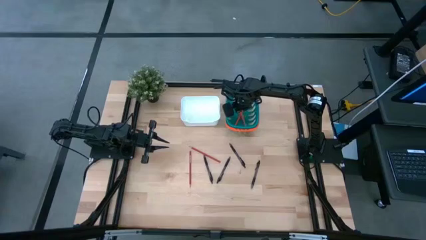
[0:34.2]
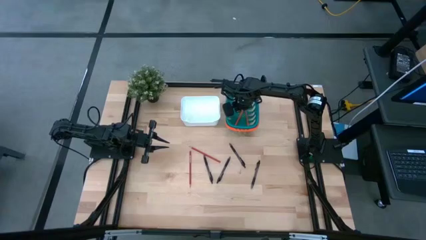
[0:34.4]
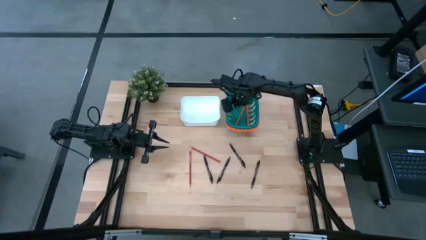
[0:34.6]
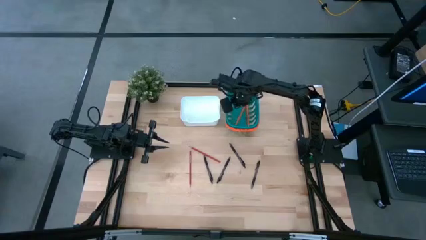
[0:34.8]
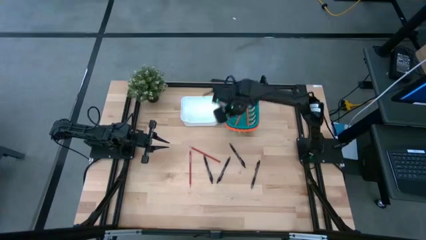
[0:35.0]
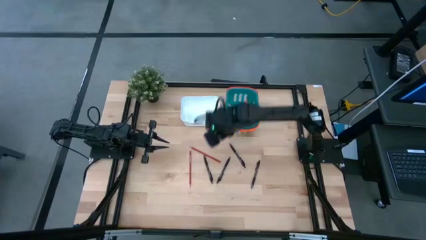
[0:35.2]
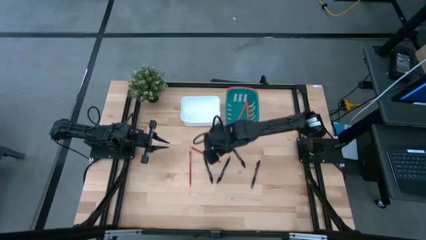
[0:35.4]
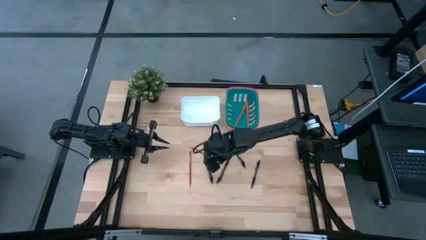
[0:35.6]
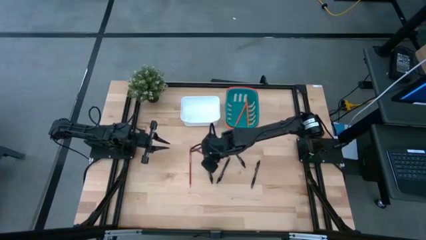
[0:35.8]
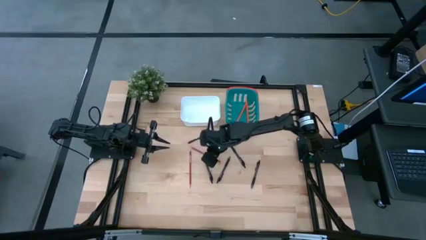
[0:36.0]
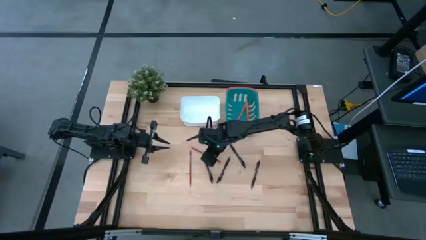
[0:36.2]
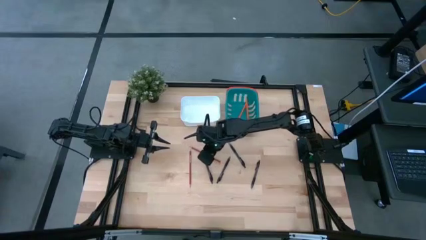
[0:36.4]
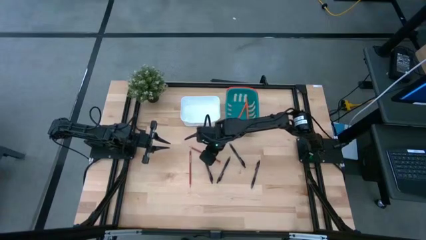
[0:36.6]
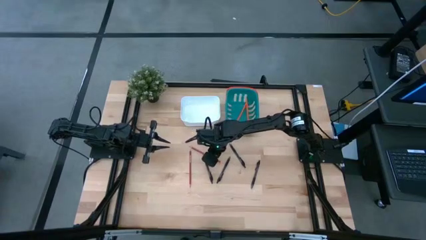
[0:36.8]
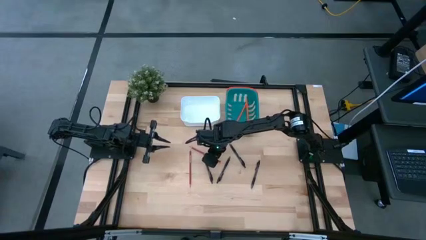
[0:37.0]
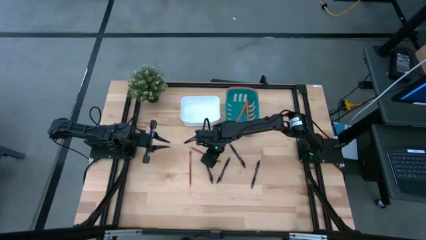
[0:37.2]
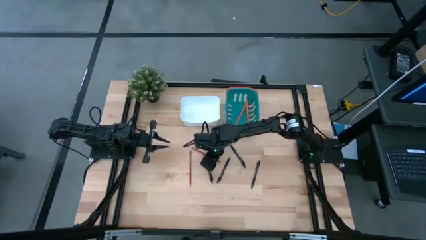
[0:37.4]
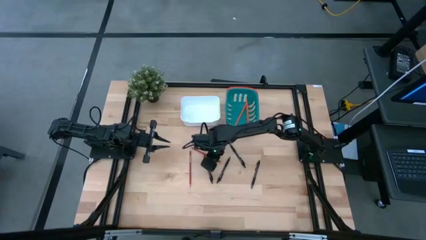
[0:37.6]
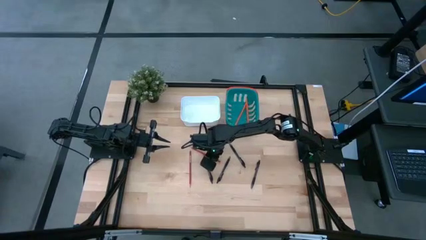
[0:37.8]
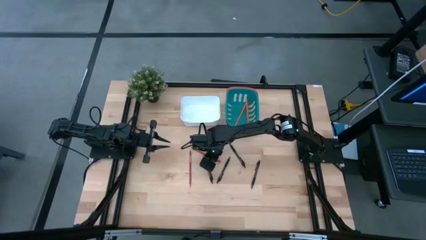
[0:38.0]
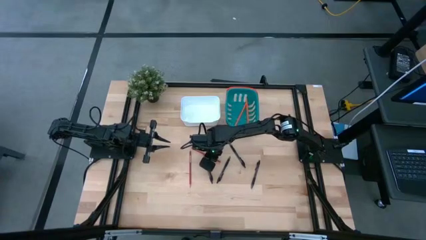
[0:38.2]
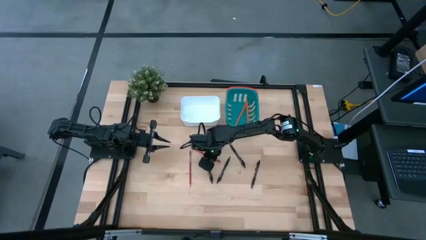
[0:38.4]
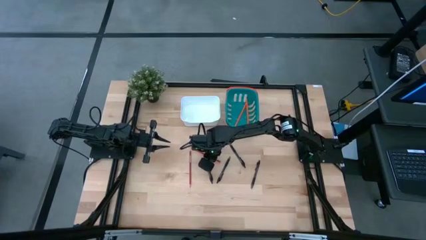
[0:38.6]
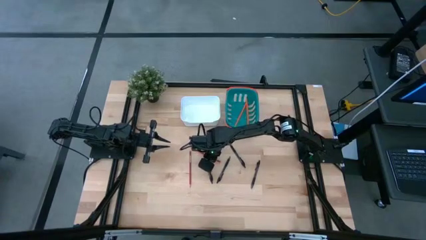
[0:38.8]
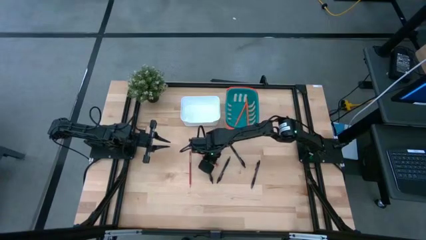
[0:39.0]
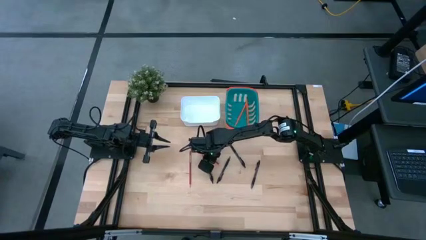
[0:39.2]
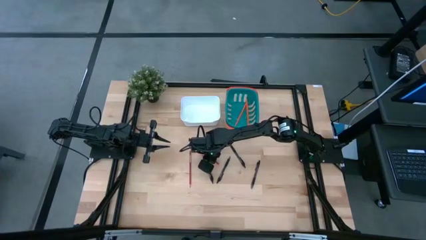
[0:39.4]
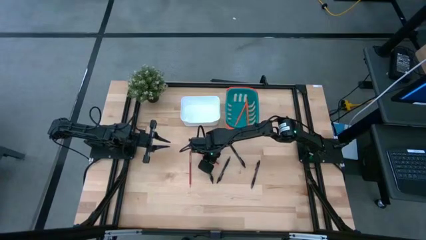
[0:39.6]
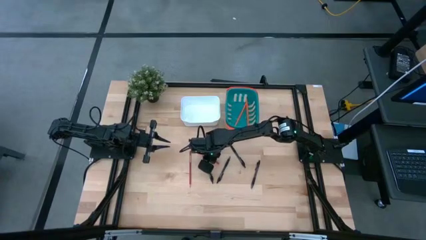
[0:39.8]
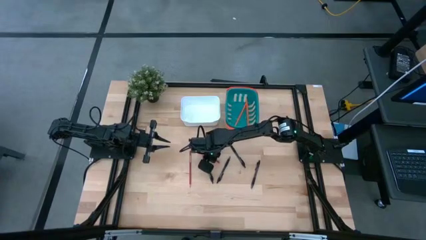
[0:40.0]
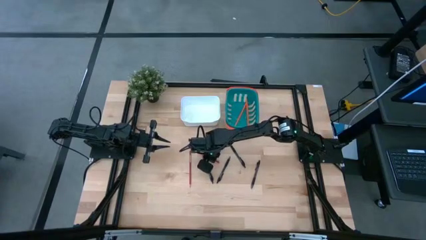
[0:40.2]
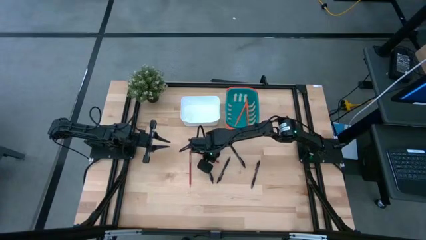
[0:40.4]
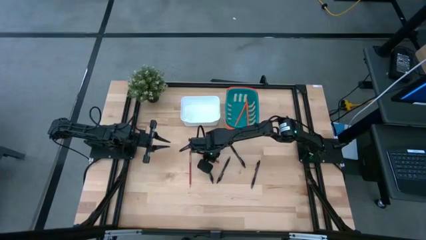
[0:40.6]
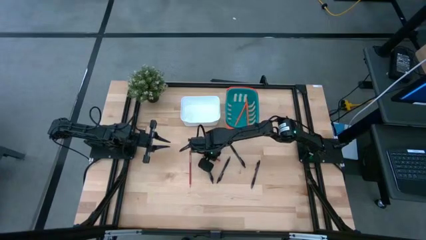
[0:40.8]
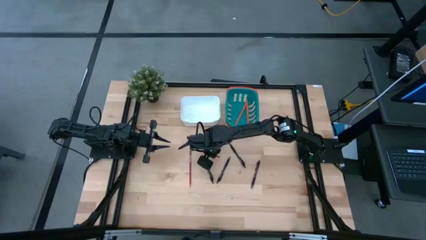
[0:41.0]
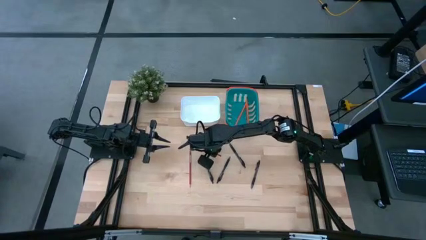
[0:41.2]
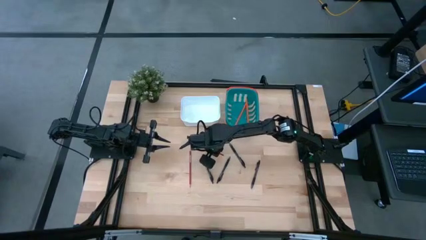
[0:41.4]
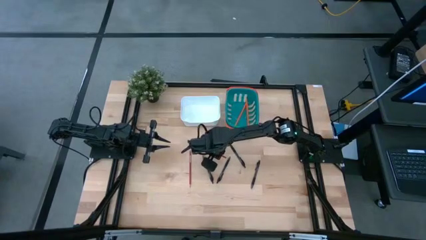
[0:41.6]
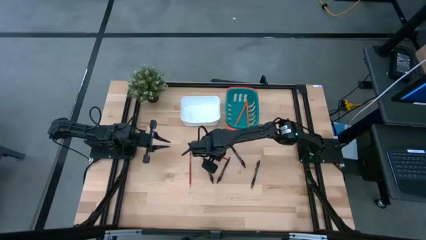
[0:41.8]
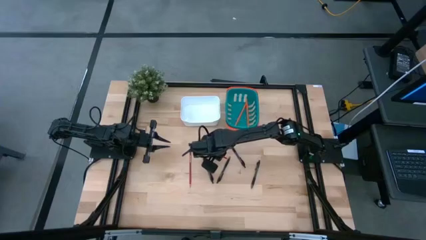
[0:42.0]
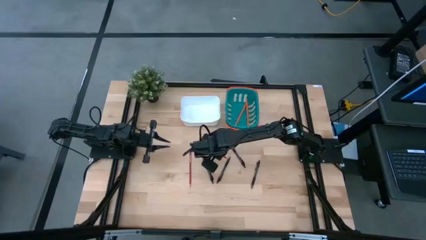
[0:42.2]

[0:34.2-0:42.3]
Task: Sort pens & pencils
Put the right red pencil into the blue bin

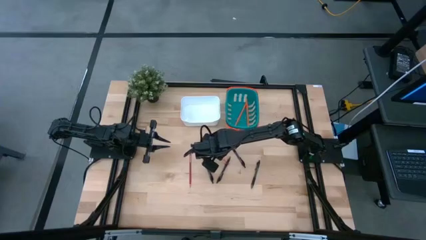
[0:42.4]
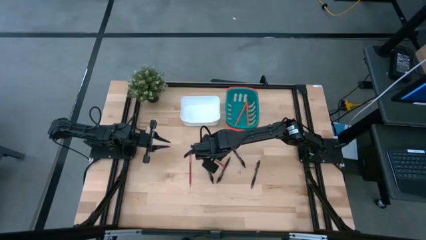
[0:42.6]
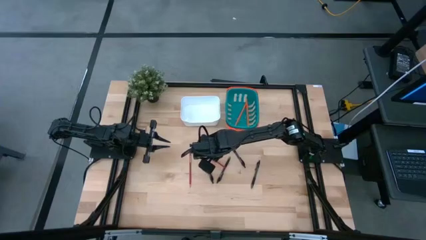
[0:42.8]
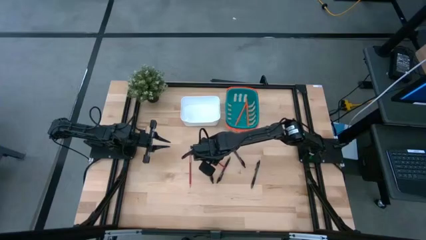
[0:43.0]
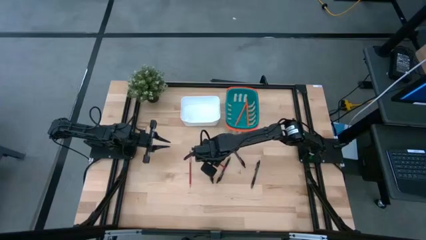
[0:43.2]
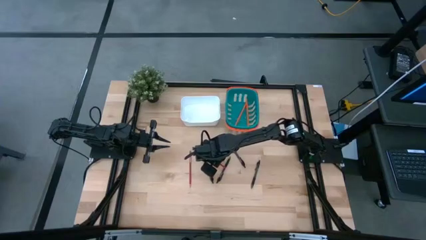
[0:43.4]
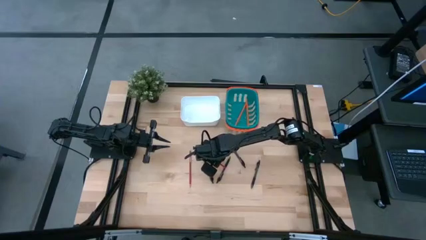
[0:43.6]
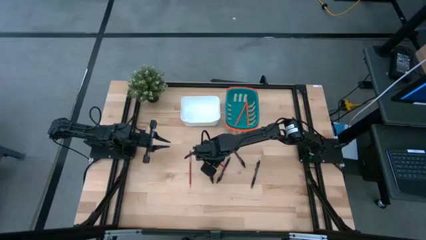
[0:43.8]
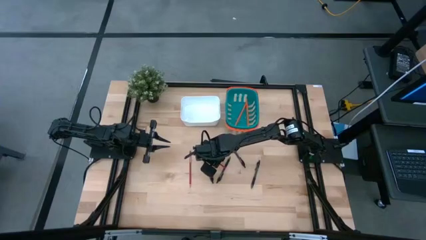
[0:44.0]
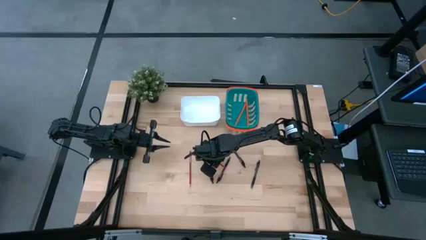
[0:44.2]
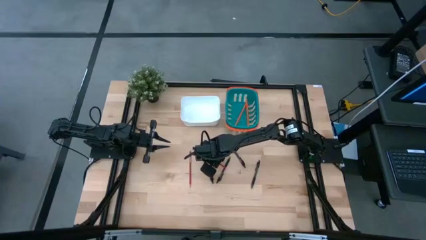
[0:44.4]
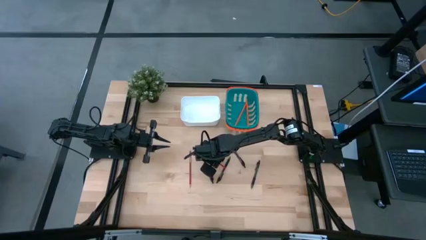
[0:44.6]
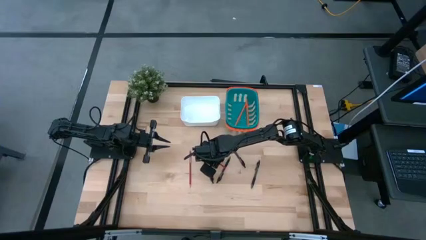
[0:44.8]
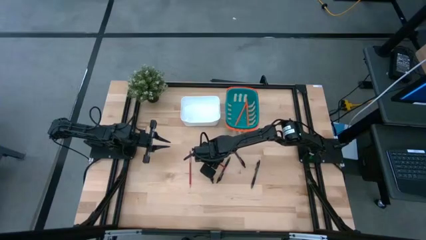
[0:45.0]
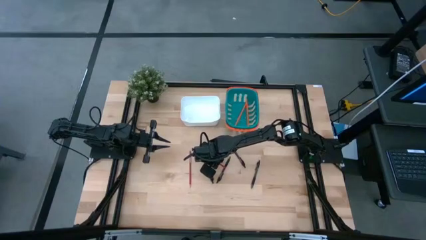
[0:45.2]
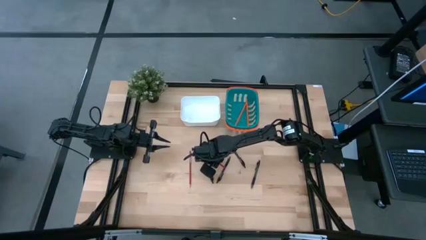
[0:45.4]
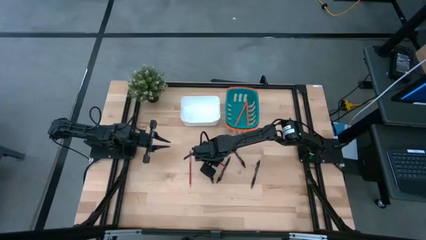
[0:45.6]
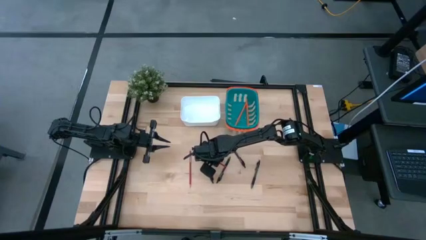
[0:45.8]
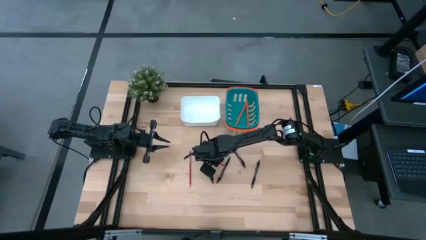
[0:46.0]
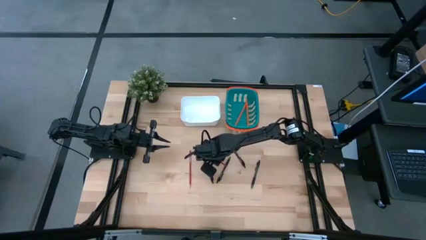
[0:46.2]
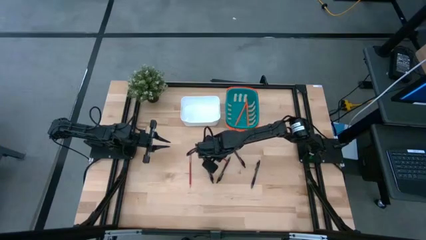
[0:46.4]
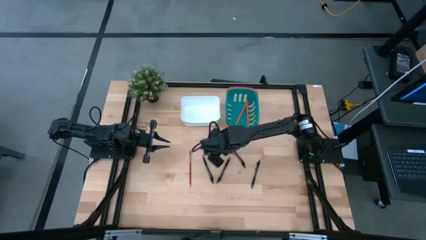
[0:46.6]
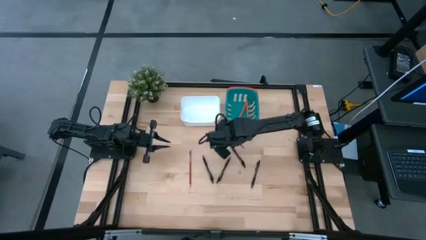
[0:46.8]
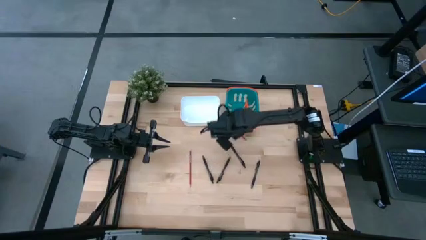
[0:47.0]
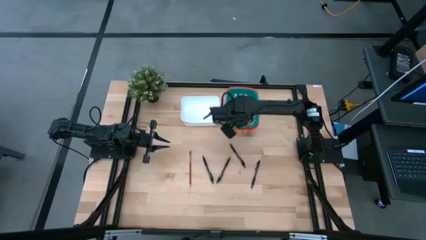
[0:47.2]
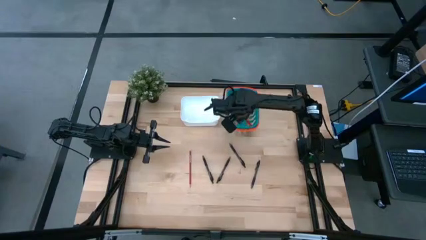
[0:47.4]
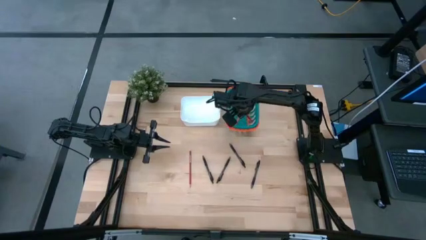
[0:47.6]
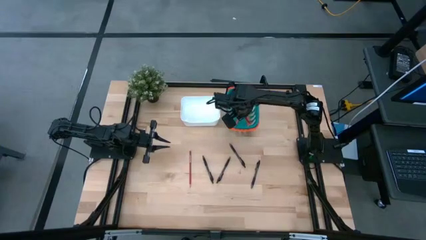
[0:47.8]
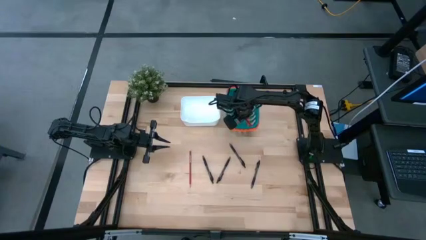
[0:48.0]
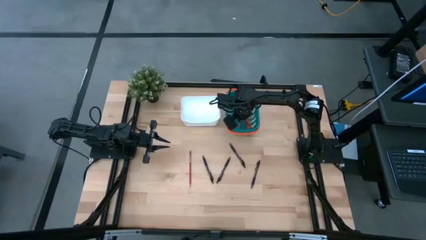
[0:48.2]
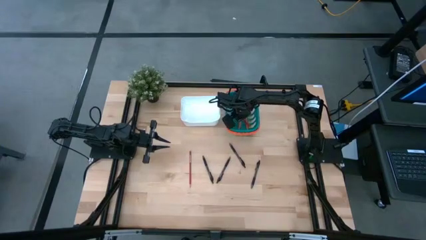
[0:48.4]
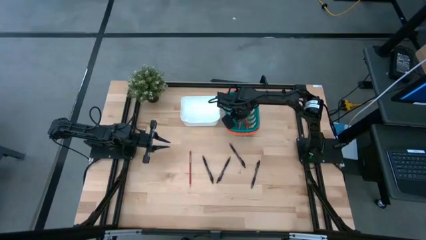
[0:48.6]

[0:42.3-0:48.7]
Put the right red pencil into the blue bin

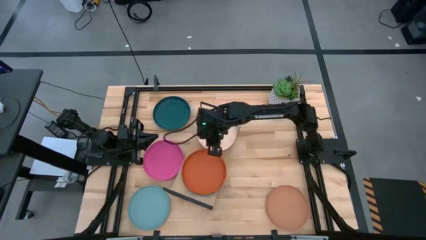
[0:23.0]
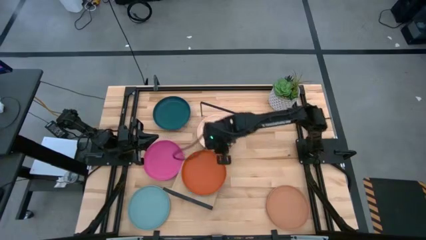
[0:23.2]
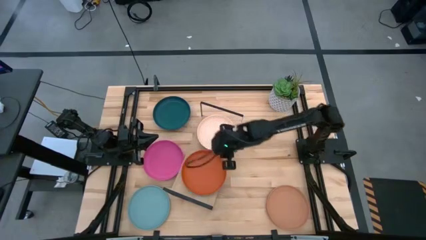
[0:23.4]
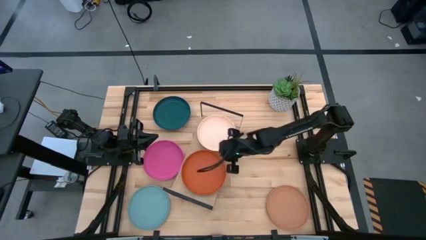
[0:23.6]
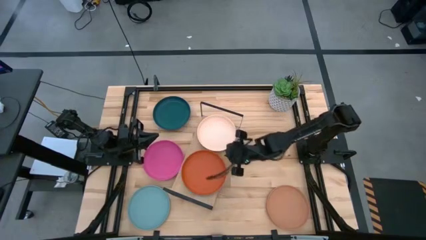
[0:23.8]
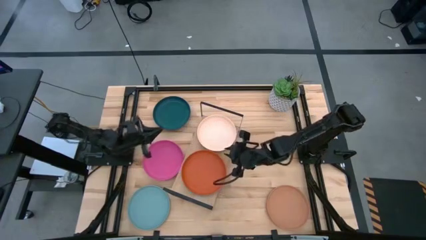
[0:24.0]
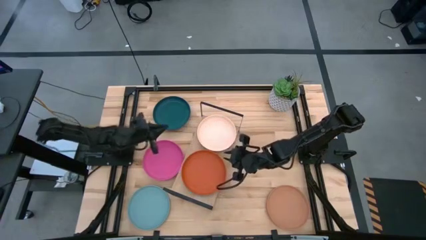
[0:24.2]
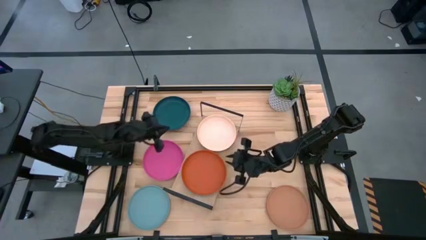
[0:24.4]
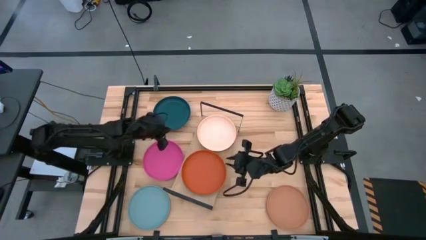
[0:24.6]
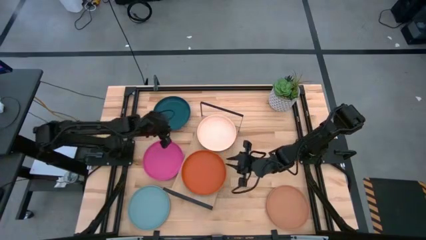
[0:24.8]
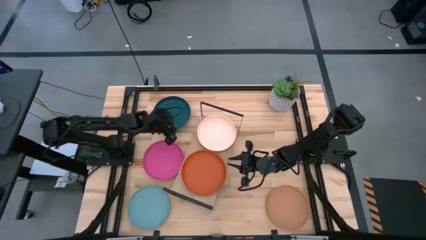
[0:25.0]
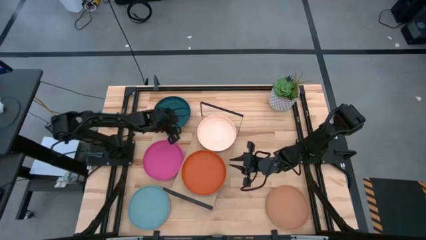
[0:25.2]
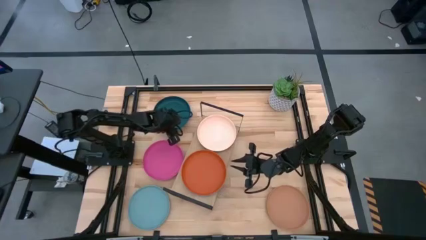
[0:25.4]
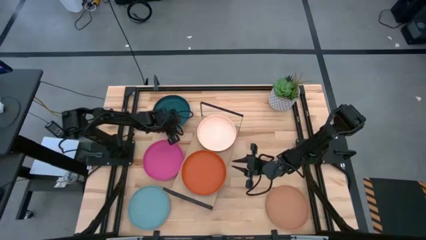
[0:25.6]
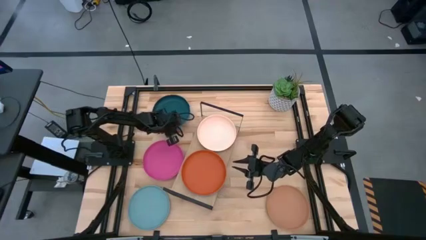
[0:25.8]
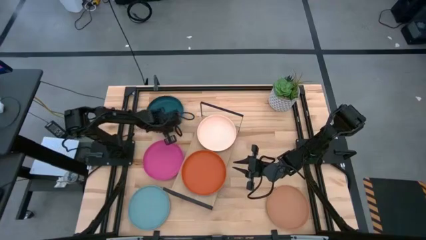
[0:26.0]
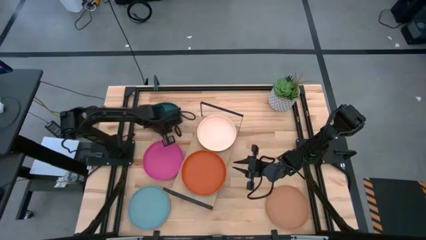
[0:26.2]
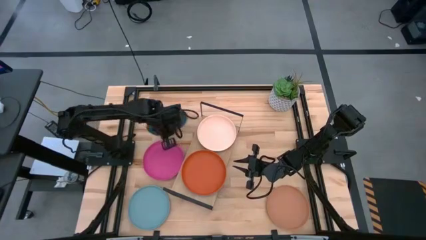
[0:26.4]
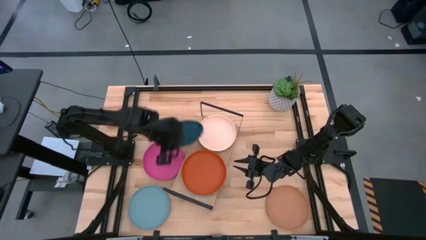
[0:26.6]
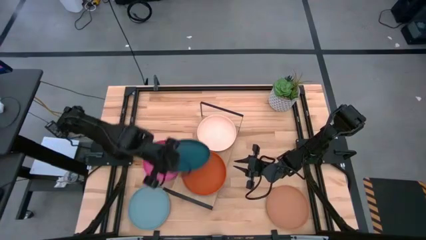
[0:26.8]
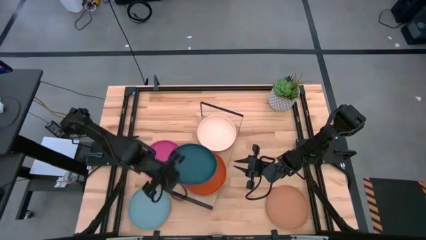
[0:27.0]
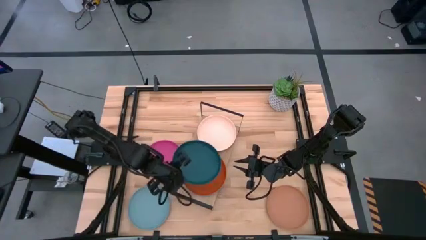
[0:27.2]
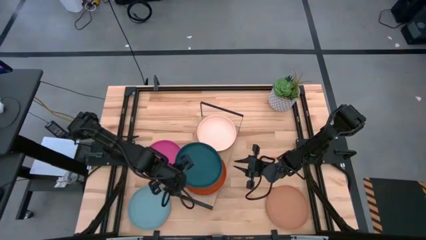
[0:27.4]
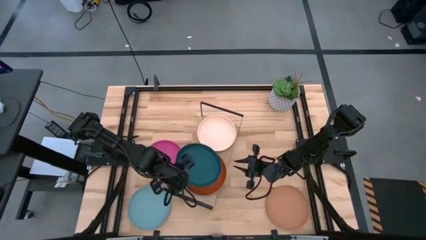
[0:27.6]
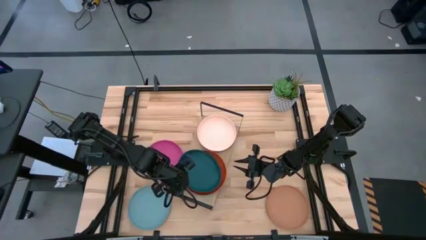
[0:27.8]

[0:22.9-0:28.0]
Task: Place and stack plates onto a shelf
Stack the dark blue plate on top of the orange plate on the shelf
